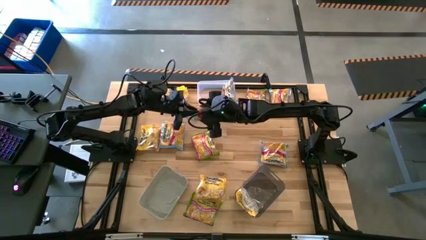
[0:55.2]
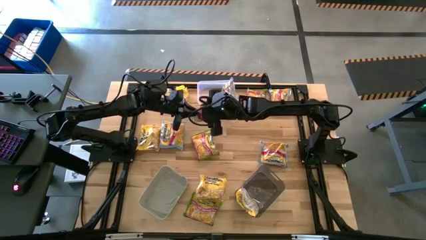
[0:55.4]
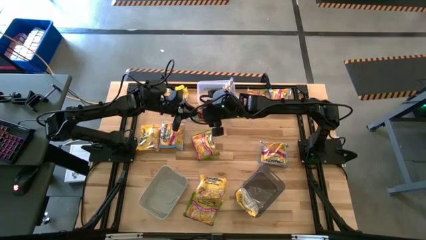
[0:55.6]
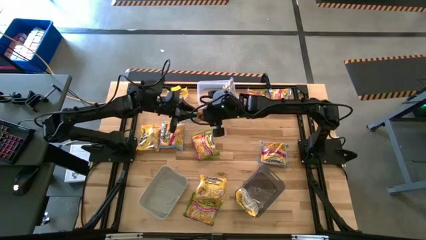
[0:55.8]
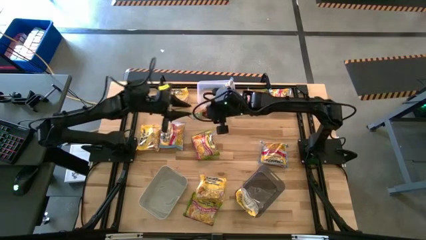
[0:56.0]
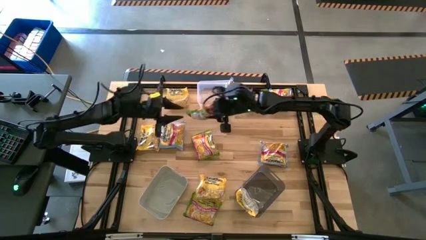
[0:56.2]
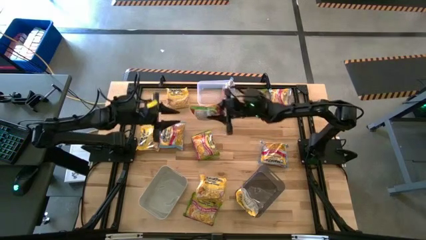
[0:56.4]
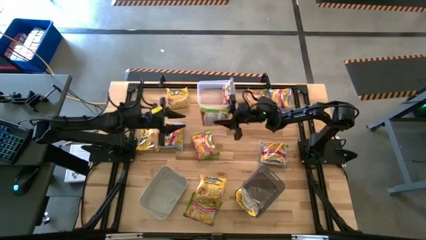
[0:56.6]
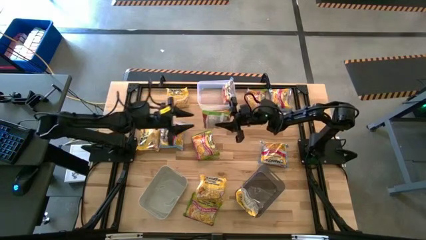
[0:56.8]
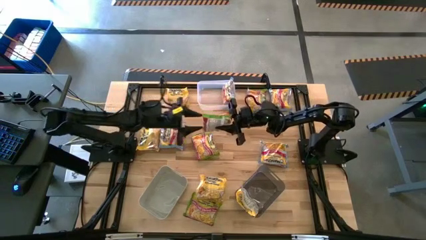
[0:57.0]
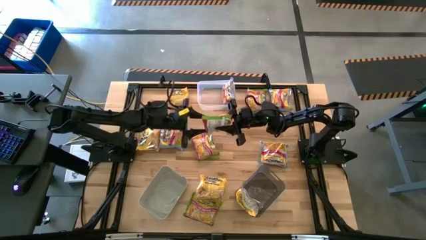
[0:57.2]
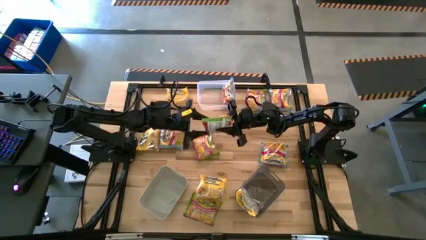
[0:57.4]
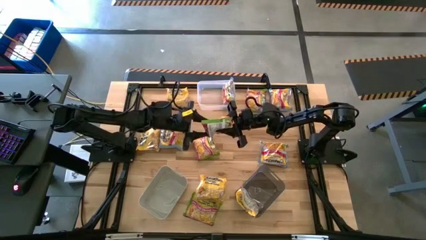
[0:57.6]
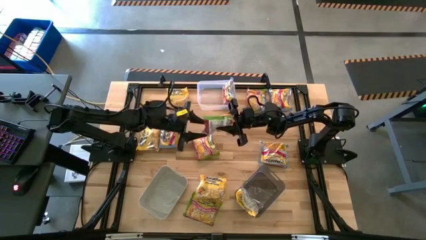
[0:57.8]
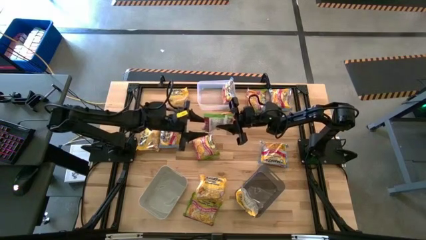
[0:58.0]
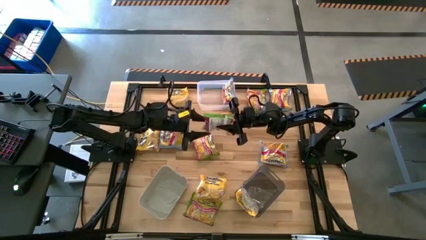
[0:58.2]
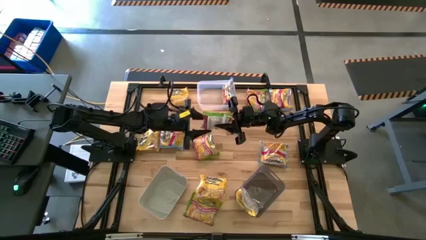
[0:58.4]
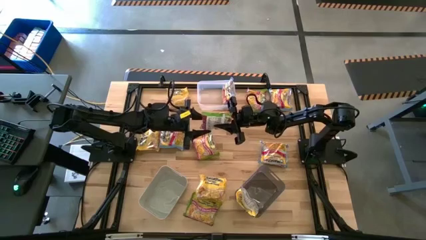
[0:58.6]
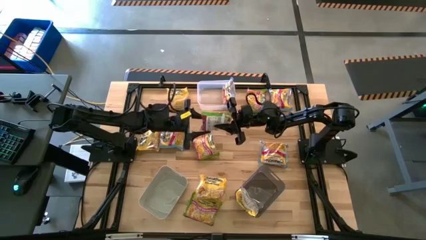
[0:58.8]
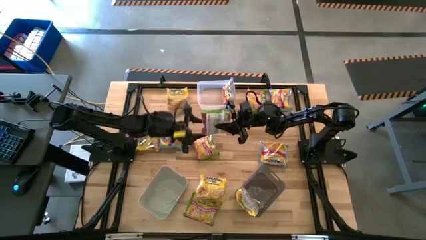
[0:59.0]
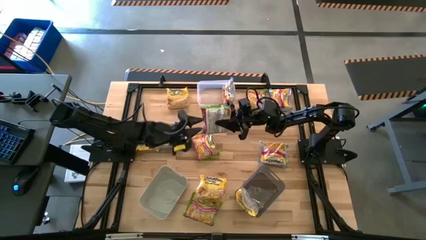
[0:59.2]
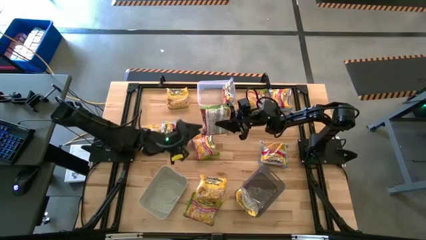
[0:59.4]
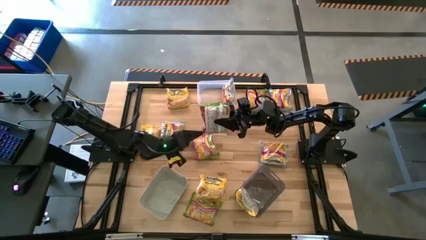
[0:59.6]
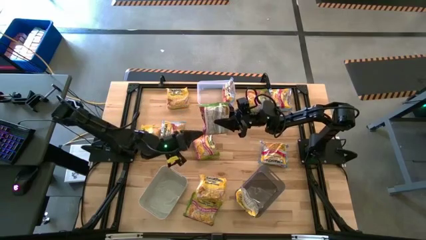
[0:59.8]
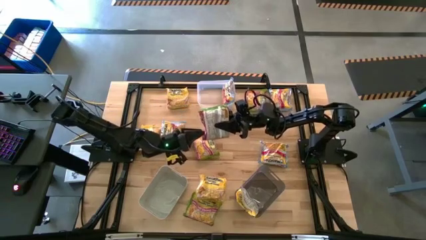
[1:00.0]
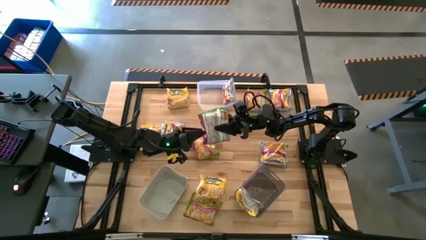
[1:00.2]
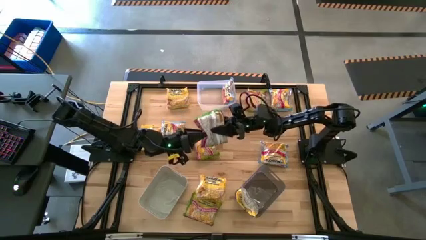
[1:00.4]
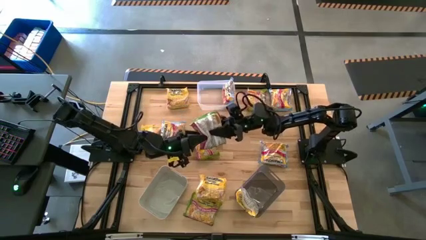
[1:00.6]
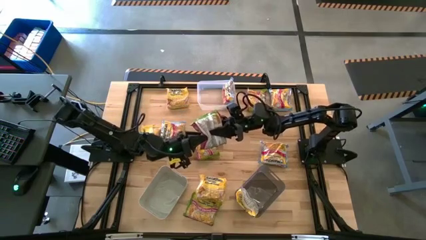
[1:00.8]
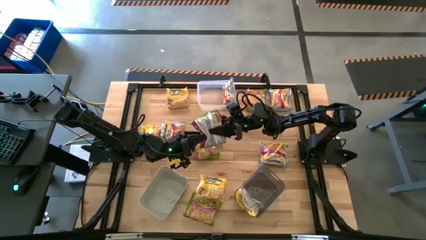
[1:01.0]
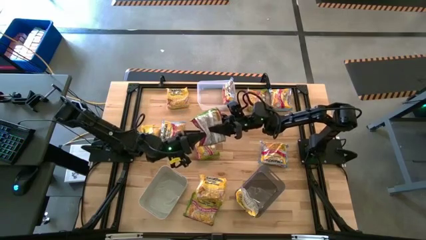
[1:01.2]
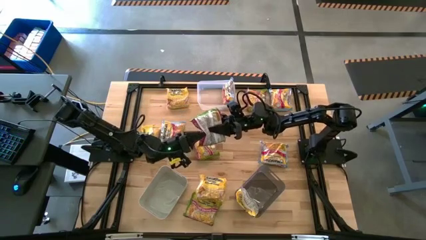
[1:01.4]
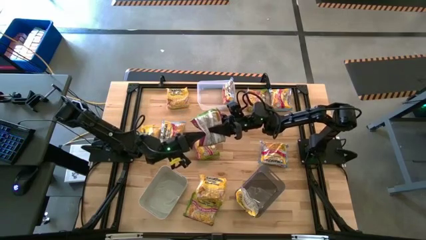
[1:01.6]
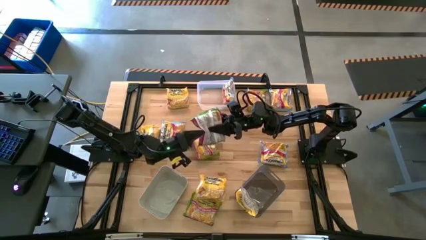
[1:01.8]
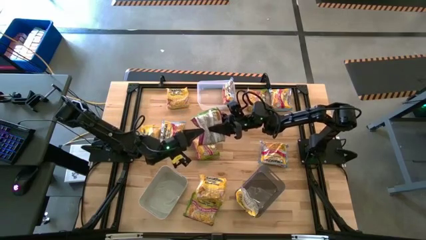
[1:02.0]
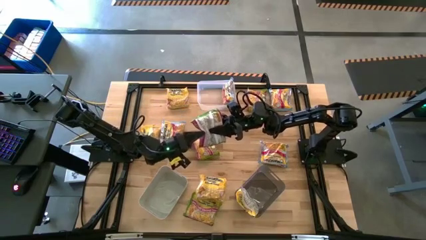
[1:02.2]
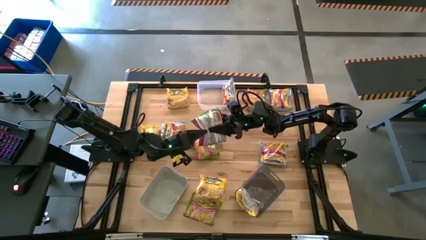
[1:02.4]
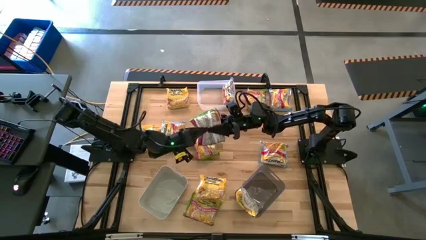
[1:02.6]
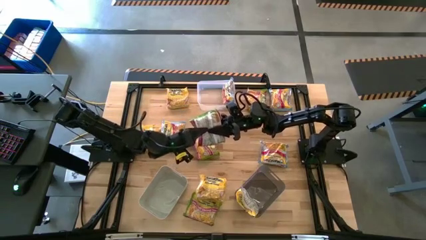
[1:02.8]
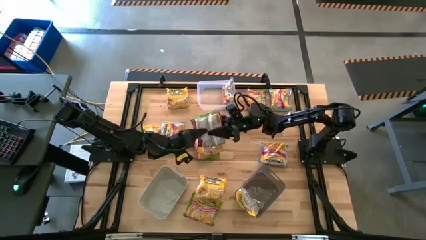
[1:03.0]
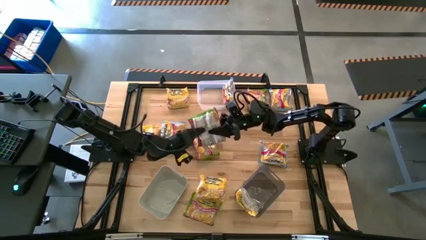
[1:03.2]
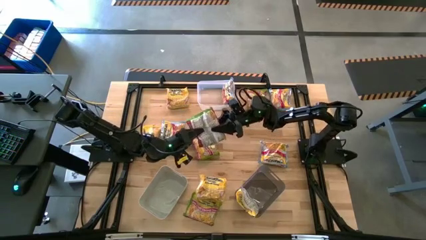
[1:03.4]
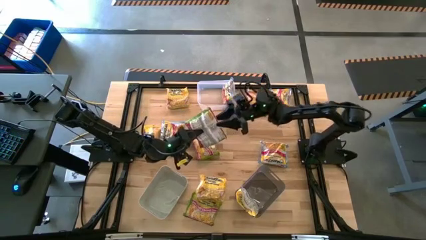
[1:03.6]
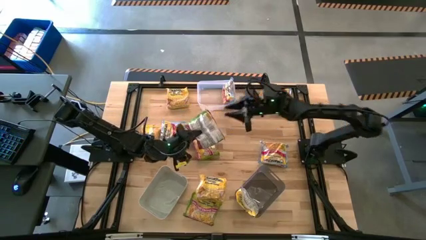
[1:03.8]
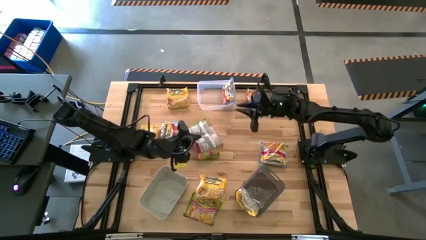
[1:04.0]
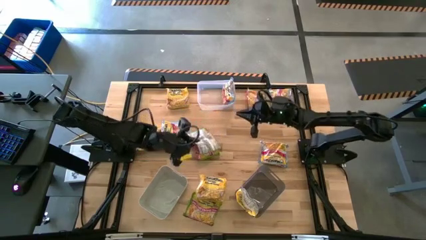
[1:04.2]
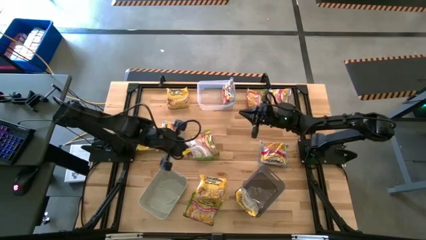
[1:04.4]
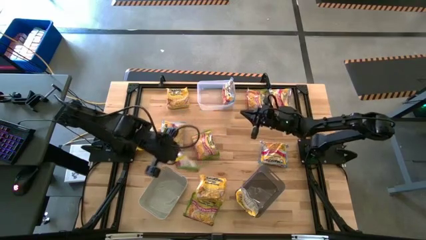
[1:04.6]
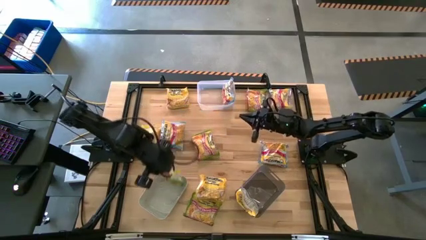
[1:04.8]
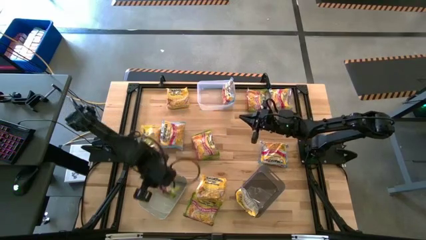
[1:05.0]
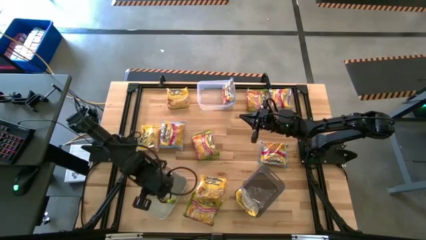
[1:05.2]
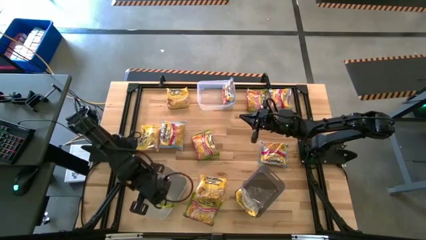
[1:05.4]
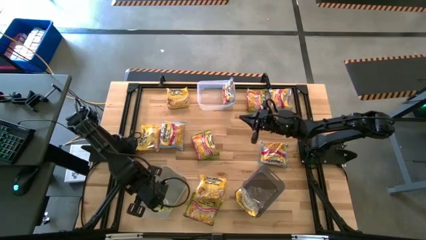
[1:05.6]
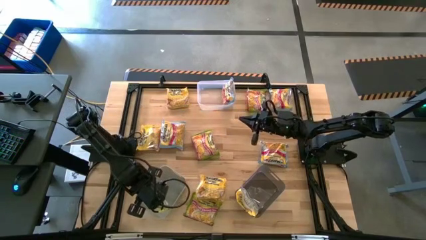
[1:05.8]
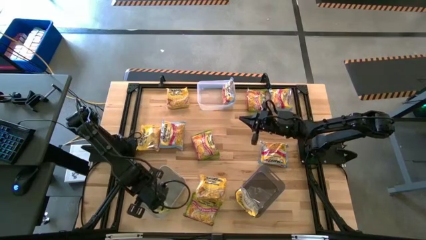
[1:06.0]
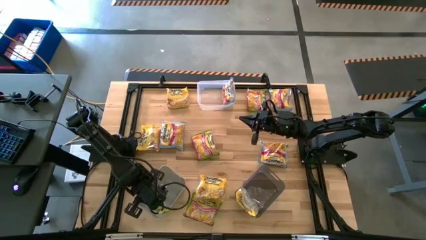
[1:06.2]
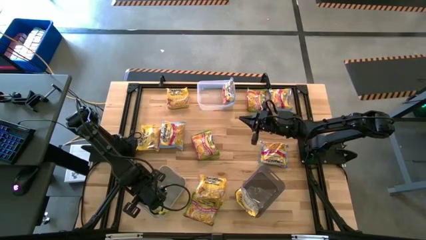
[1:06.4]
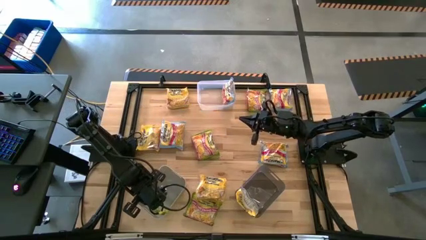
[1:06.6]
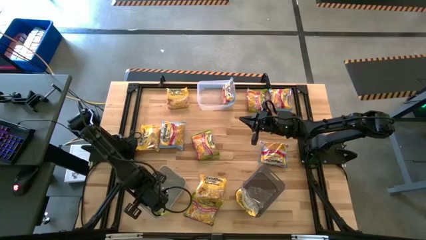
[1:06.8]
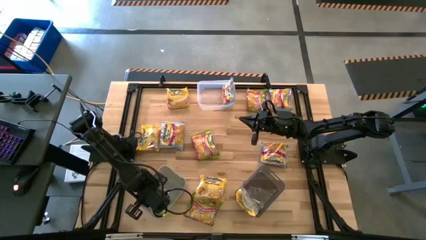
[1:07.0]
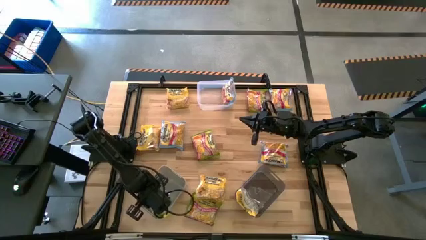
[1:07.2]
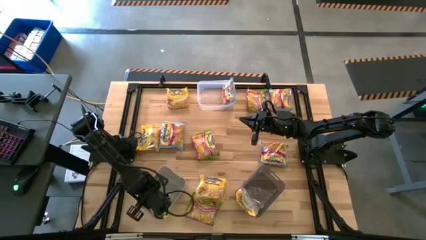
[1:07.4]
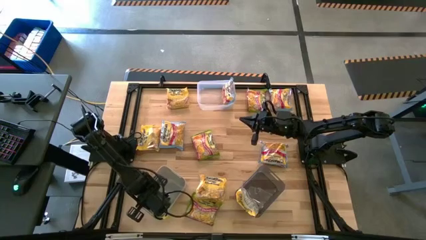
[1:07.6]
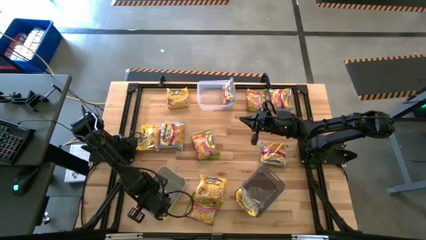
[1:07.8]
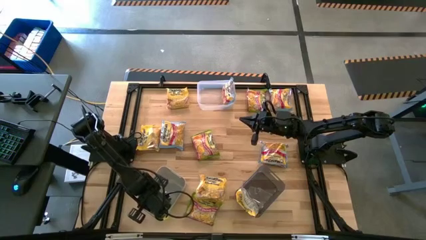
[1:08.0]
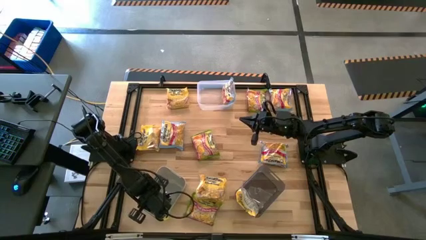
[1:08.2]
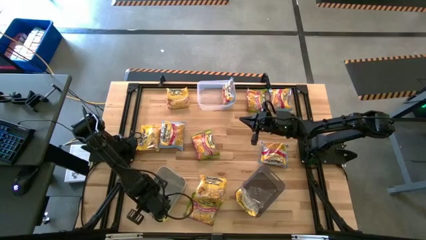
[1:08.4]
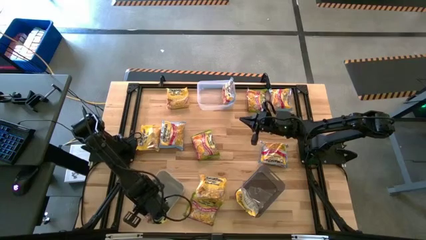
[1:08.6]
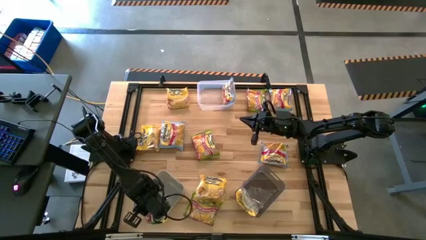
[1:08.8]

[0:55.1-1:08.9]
Task: Sort Maruchan noodles
Put the green noodle pack into the gray bin

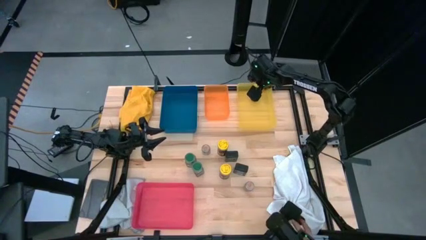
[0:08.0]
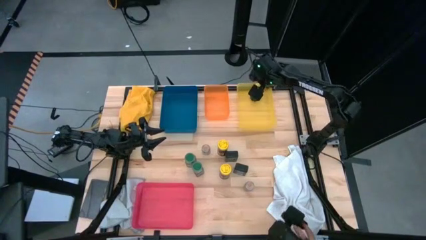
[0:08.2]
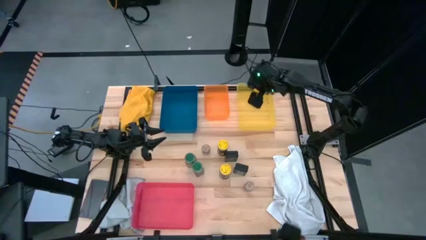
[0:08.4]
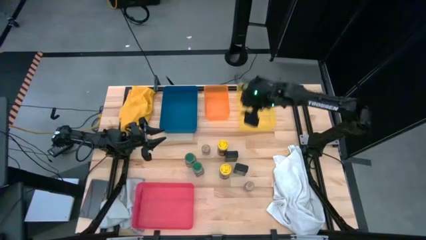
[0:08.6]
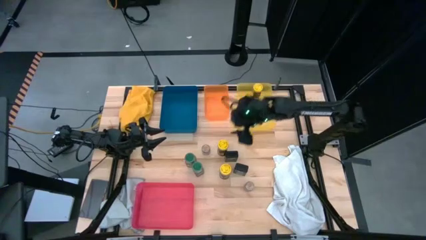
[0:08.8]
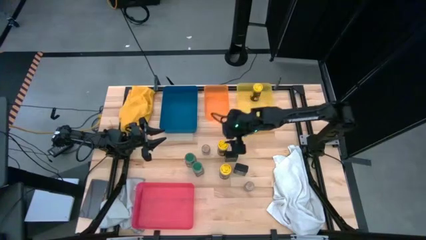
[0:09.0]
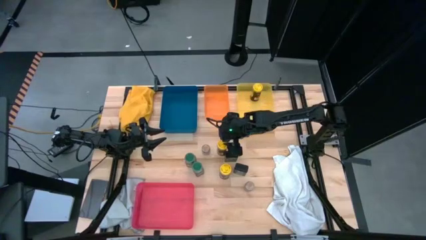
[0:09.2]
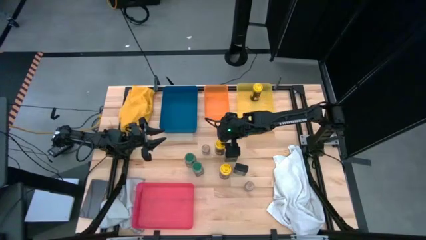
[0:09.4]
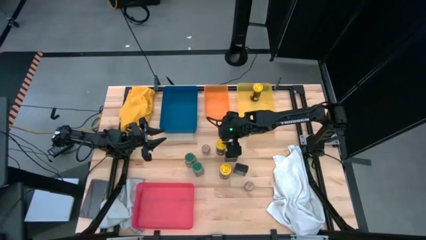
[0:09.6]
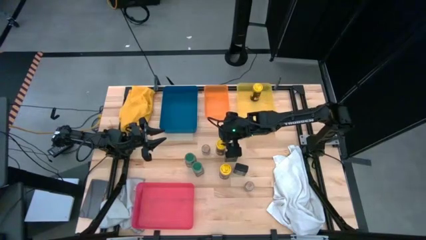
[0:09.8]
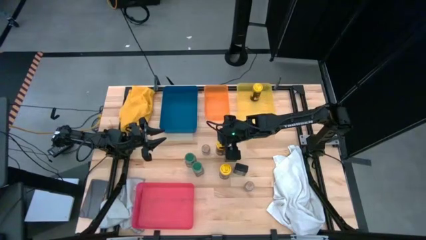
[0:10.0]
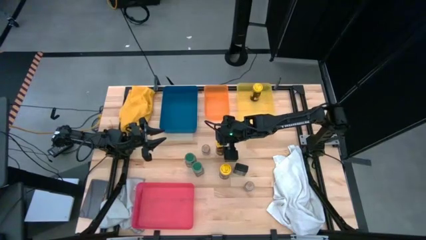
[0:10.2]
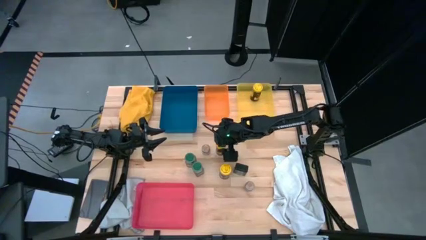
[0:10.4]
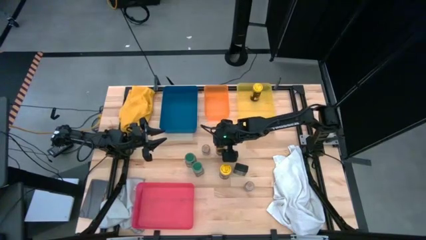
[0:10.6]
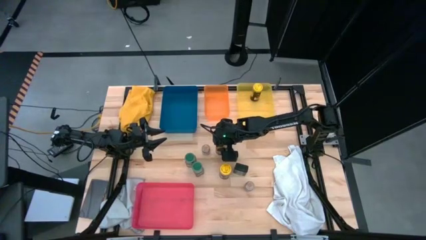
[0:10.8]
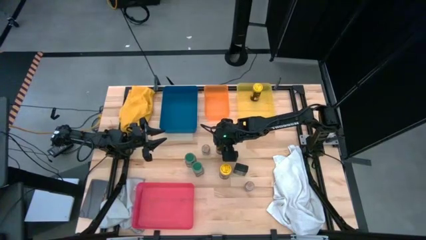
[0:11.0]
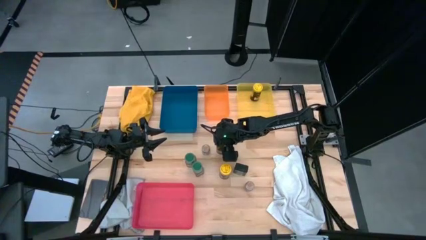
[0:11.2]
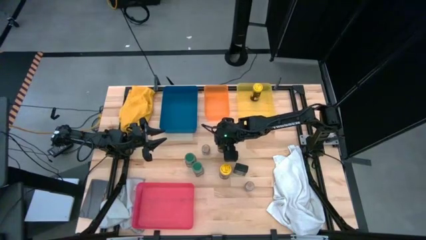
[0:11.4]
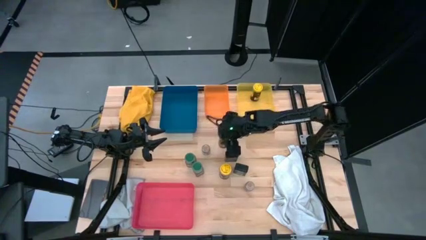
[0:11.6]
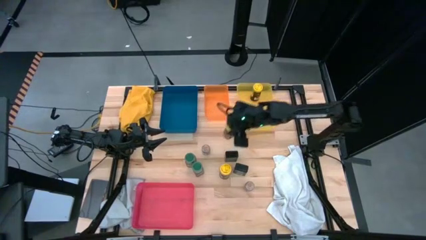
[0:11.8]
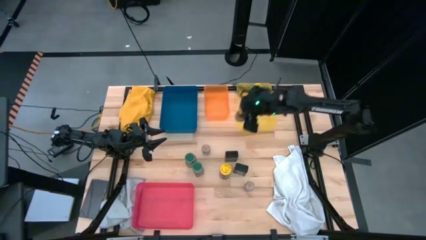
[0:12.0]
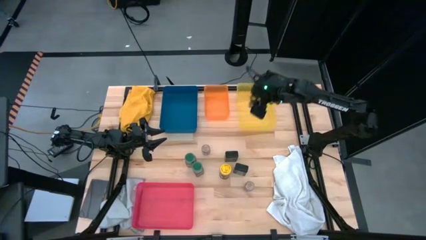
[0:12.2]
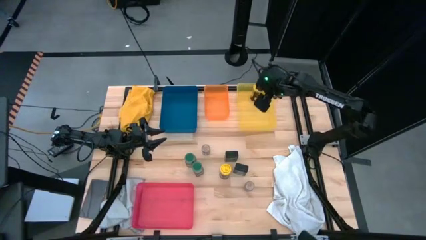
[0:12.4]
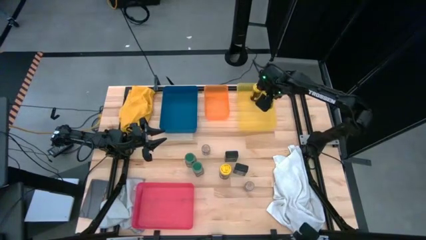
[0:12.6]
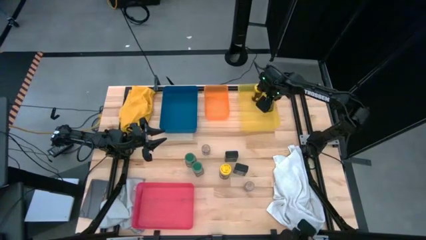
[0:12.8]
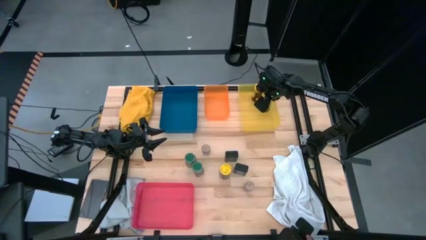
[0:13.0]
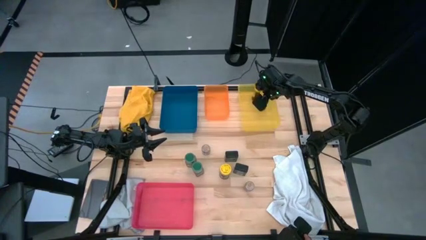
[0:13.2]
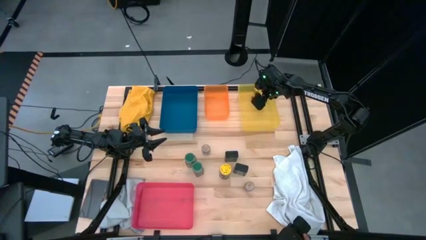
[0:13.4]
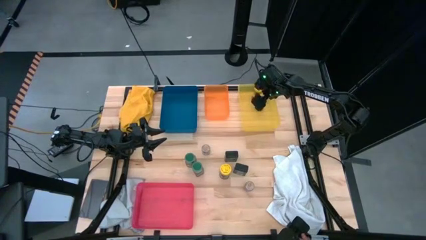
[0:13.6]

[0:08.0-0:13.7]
Task: Sort spices by type
Put the top yellow seasoning bottle into the yellow bin
